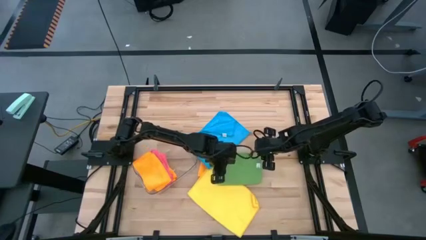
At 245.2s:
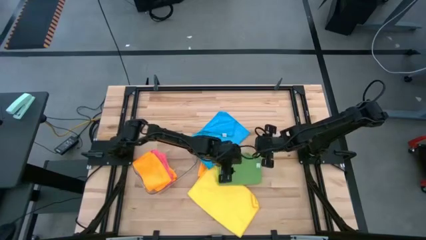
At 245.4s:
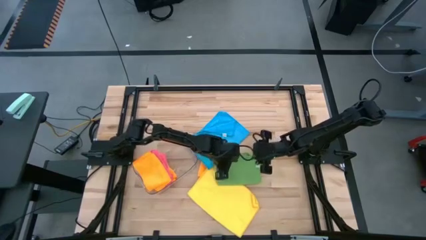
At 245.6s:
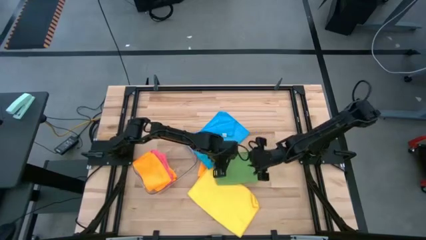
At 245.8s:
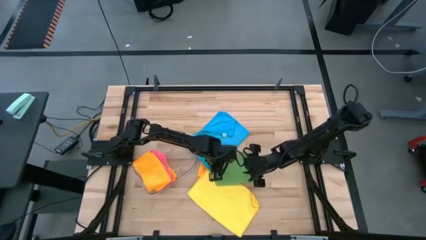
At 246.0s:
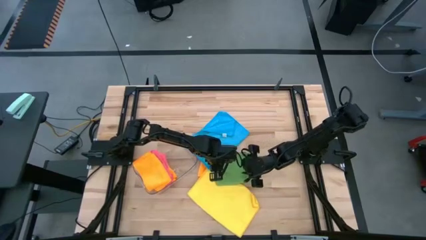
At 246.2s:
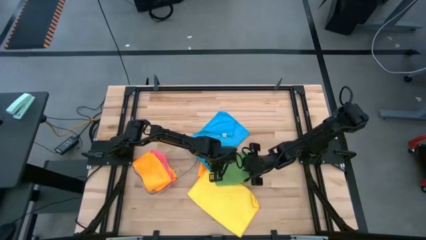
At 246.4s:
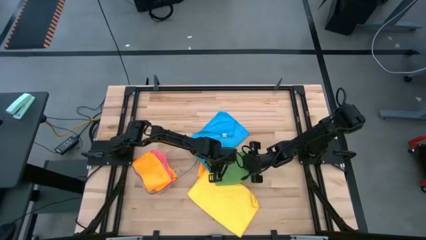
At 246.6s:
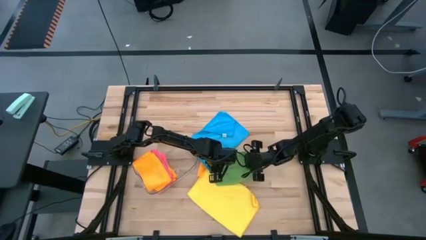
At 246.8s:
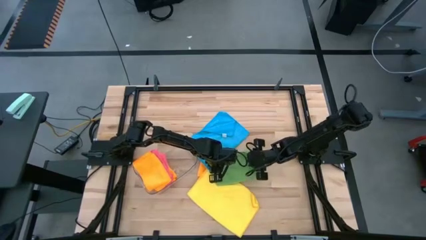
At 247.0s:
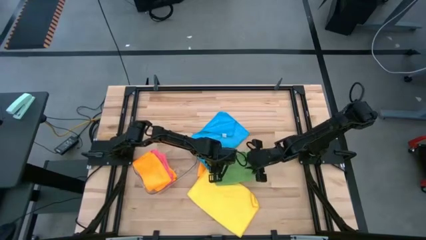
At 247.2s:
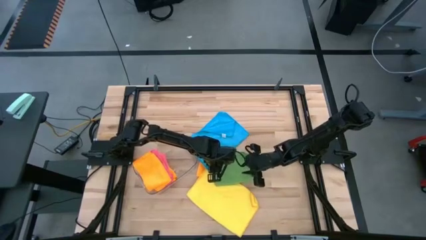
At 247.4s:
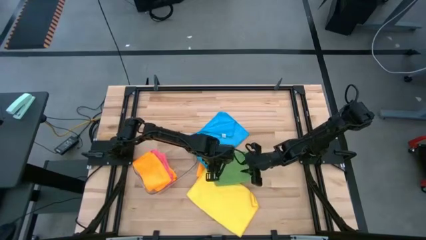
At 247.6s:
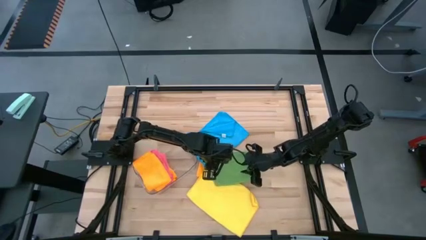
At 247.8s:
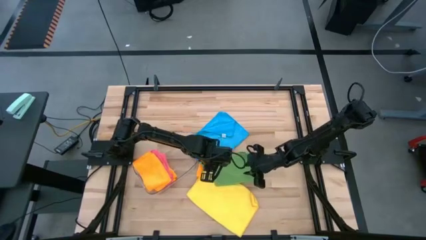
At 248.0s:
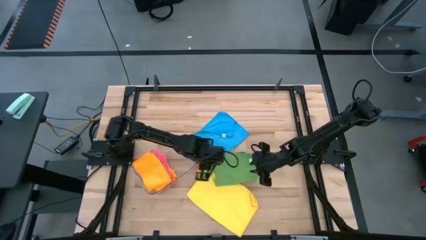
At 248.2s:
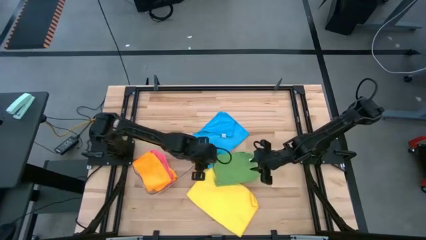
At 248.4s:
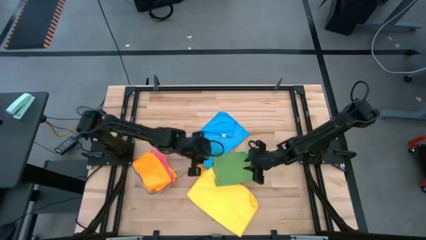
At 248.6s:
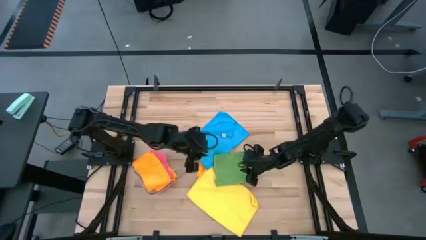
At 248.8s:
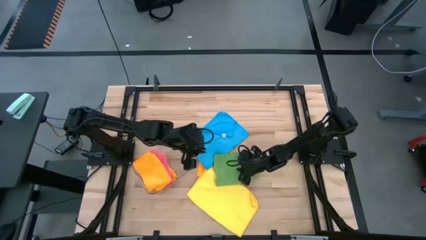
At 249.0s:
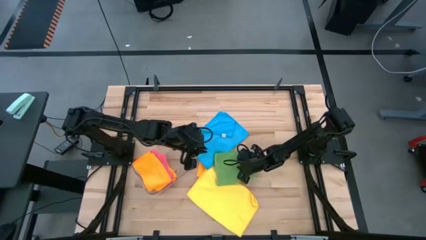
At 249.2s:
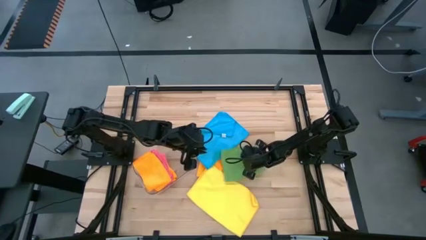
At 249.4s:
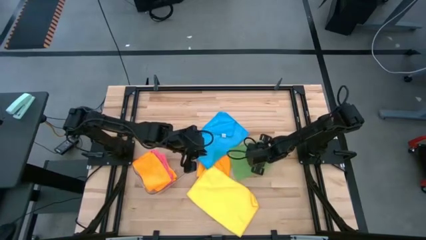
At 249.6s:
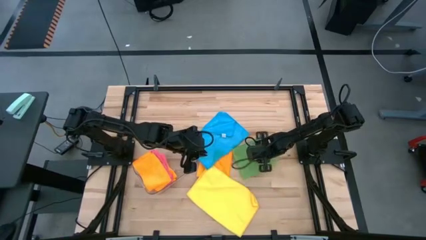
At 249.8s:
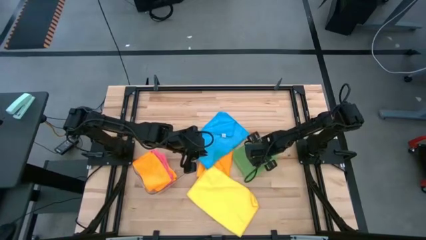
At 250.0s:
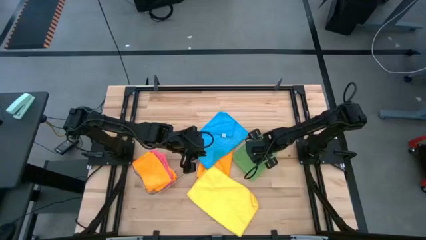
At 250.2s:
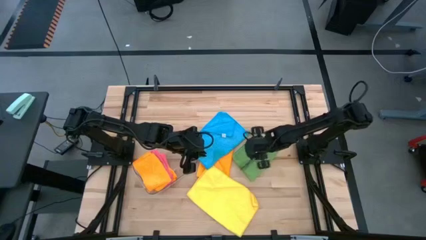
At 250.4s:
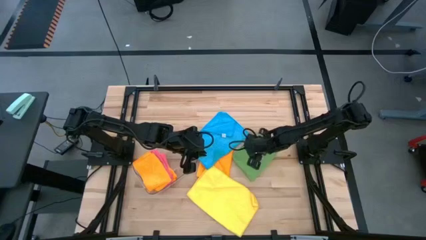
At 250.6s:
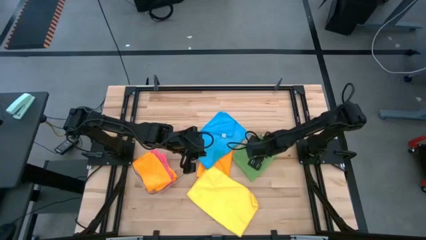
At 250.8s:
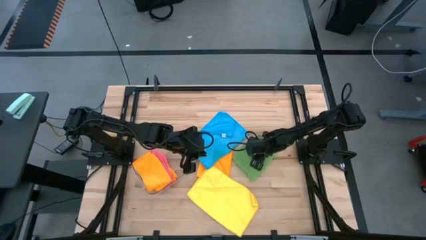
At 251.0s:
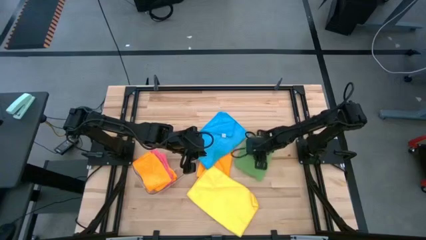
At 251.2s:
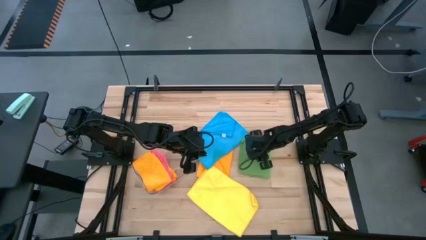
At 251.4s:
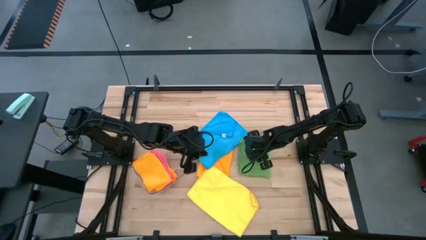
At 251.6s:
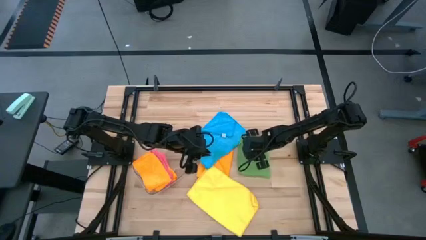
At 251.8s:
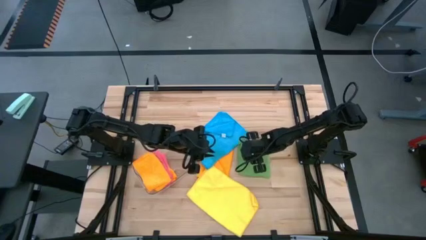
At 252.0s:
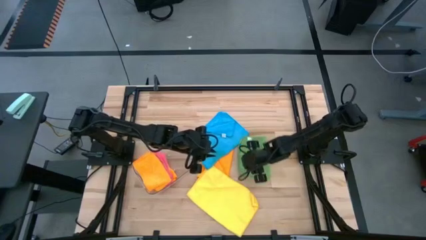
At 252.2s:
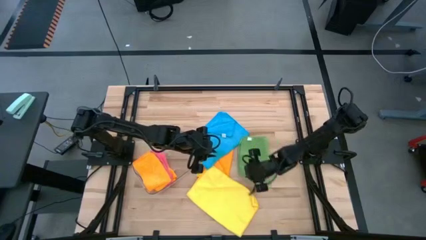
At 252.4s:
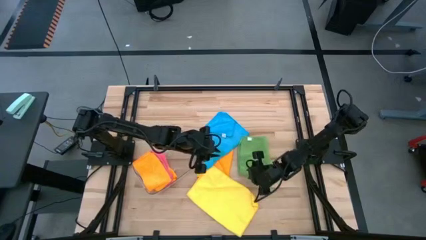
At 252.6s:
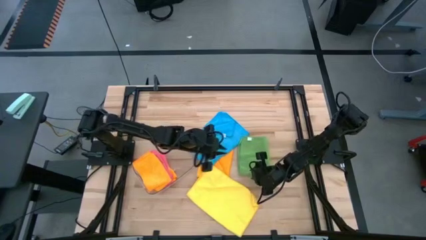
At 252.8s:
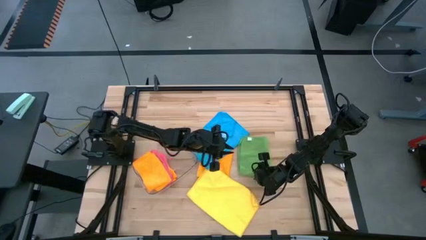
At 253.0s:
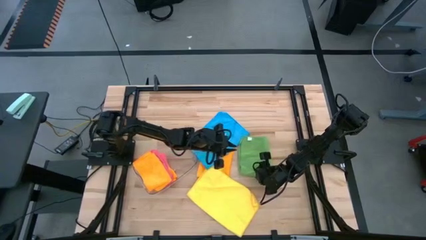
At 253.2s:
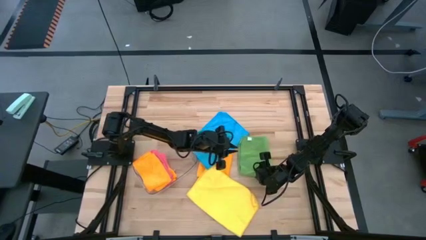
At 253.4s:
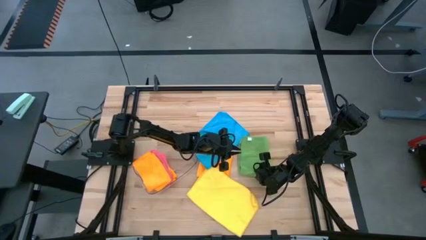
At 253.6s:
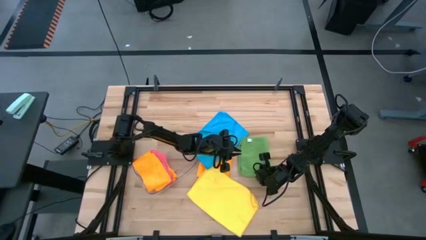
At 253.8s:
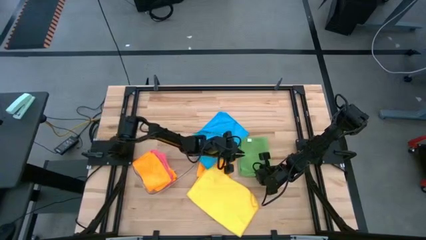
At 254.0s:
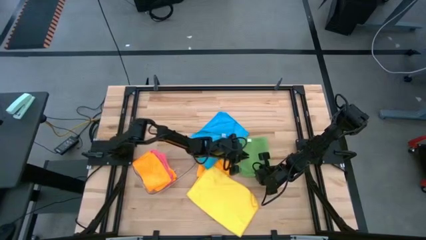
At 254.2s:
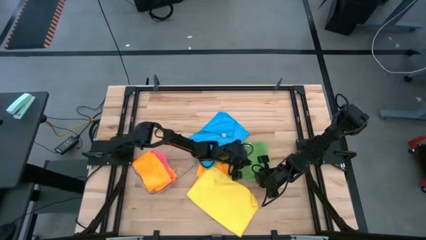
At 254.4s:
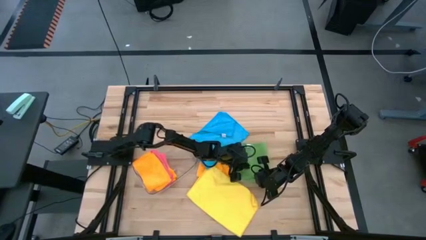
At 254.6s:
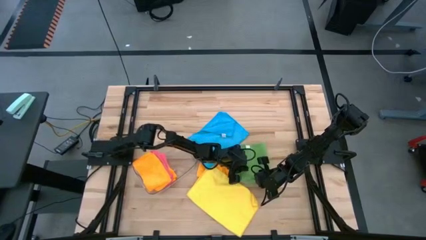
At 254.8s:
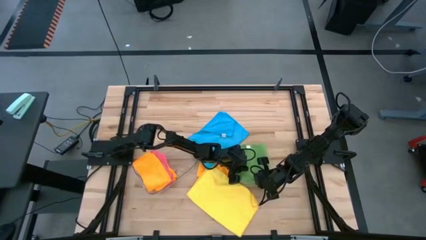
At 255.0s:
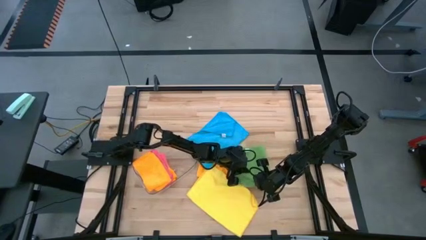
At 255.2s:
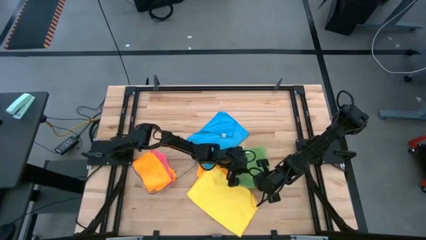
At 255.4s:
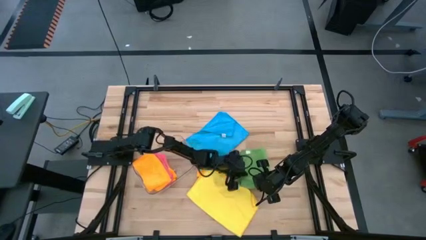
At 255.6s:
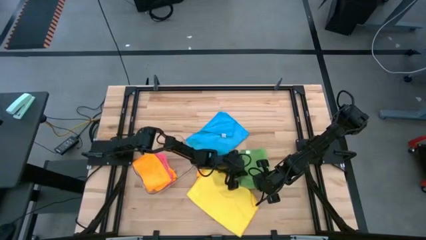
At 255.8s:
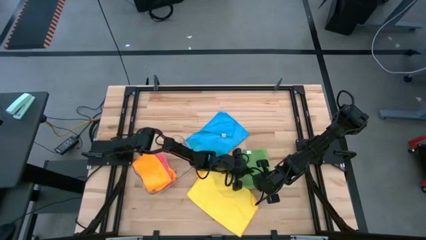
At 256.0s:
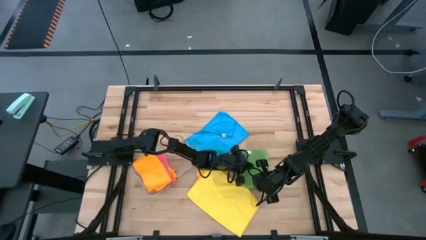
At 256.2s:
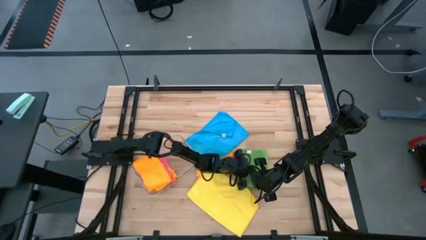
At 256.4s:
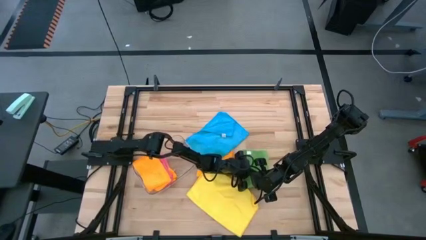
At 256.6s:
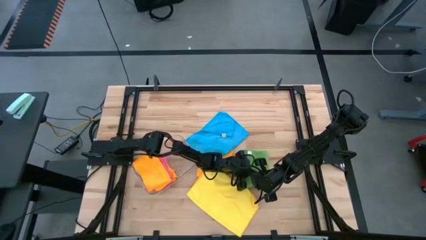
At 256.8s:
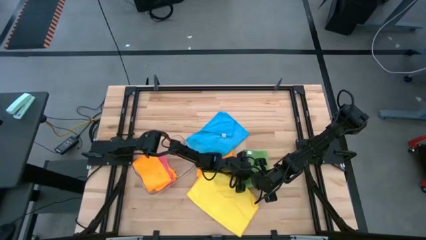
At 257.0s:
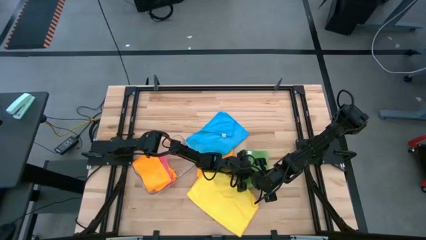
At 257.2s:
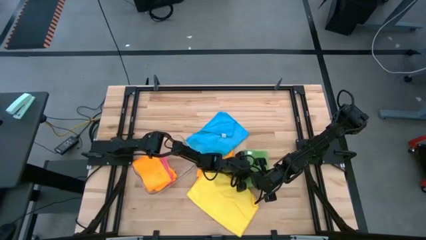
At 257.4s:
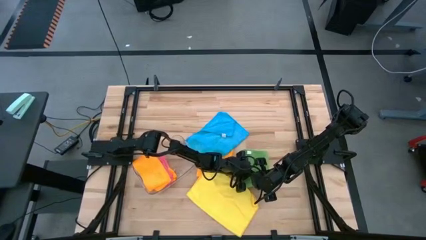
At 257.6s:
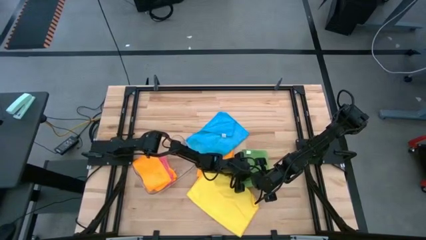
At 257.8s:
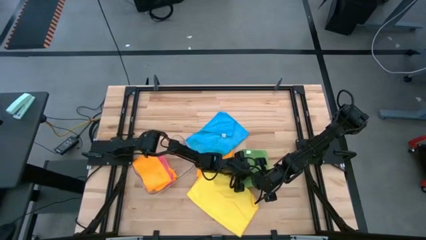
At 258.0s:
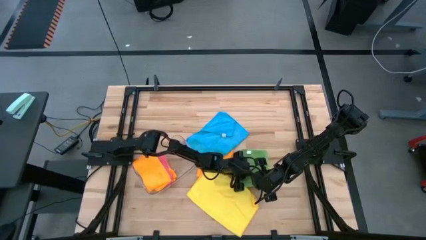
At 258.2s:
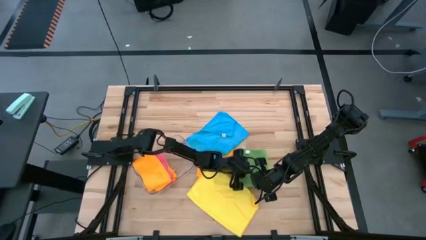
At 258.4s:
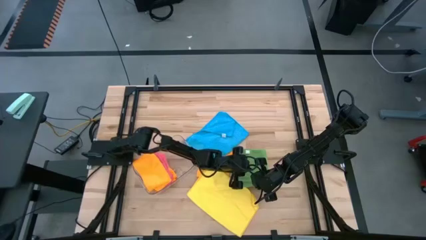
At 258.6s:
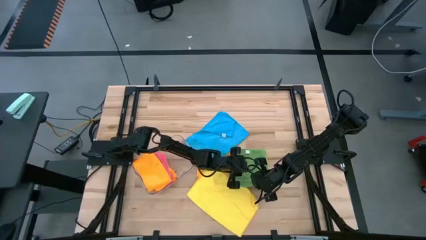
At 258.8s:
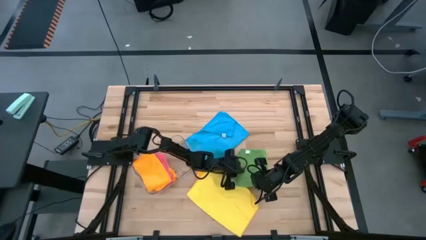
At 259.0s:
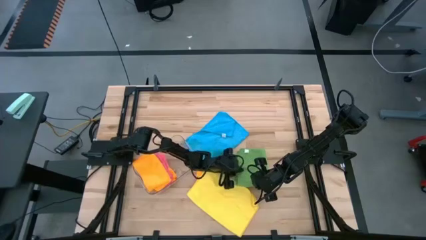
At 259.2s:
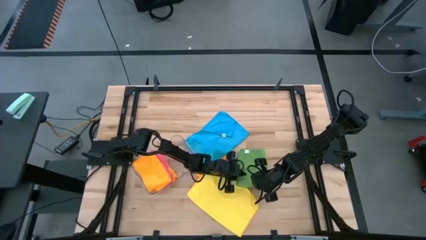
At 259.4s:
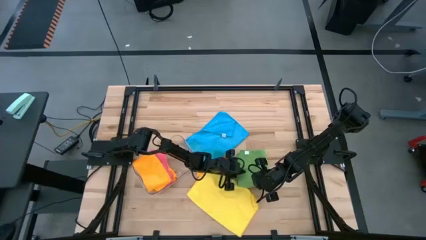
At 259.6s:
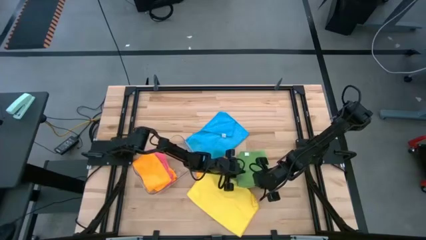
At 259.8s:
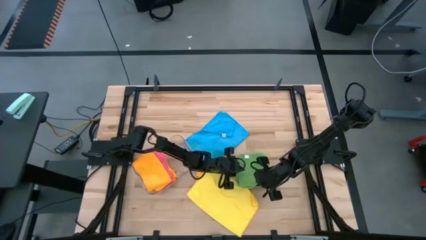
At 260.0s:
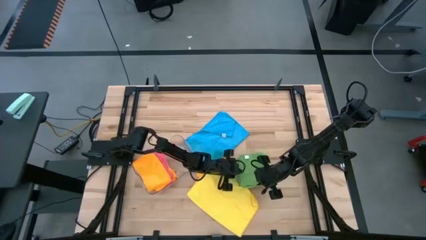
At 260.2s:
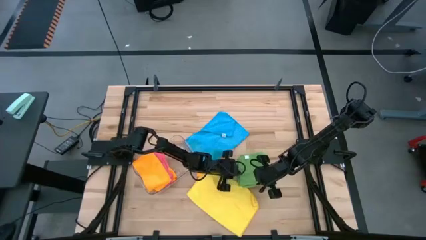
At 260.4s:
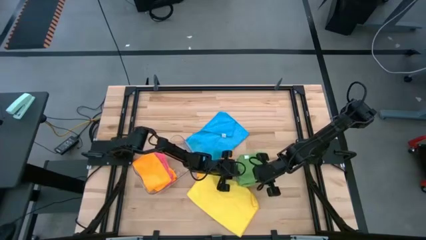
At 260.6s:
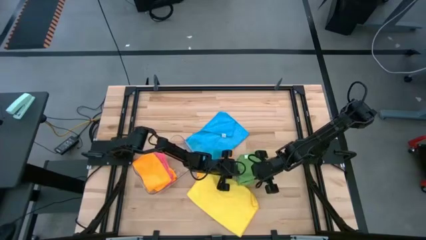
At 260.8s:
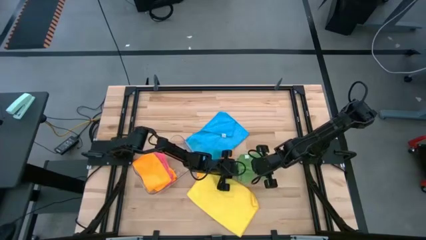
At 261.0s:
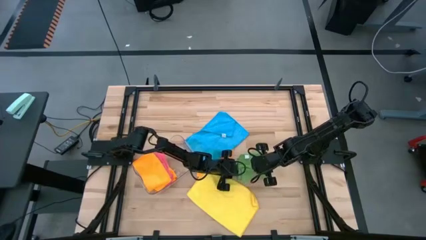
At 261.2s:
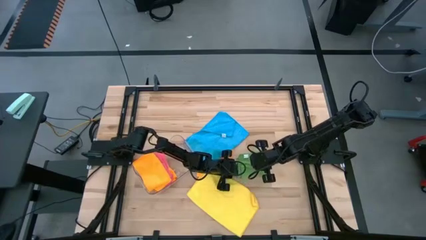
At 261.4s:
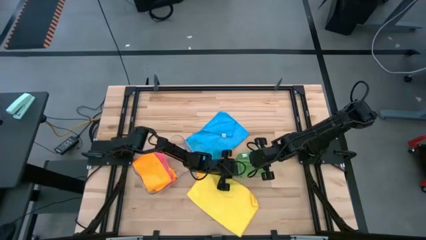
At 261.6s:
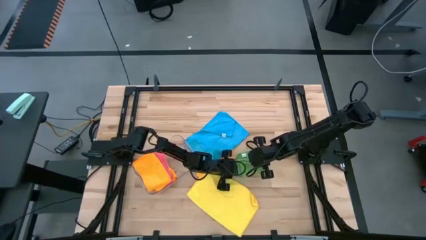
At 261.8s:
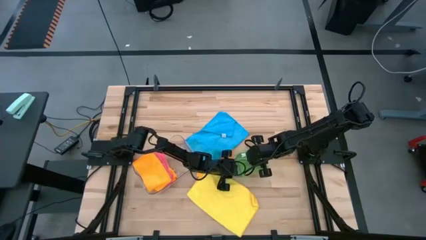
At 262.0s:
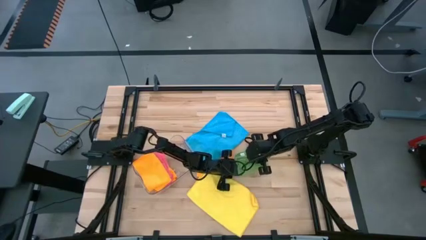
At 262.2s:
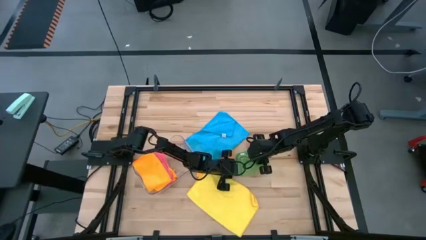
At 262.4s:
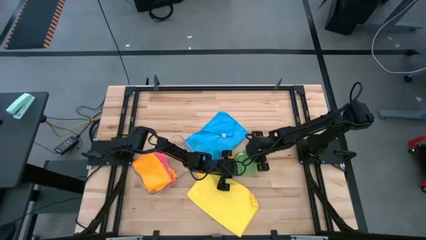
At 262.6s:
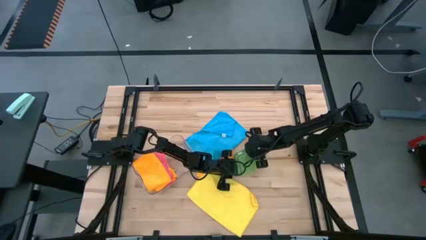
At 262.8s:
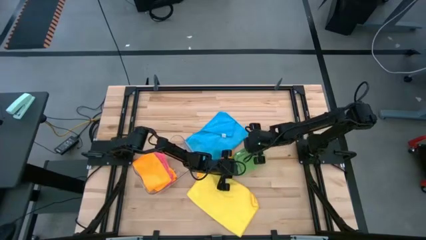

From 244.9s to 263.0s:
Task: Fold microfiber towels
Fold the green microfiber cloth
